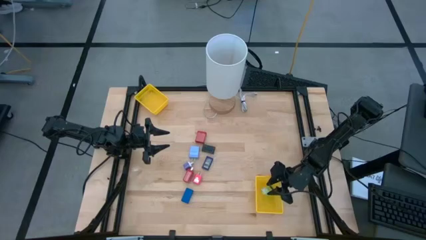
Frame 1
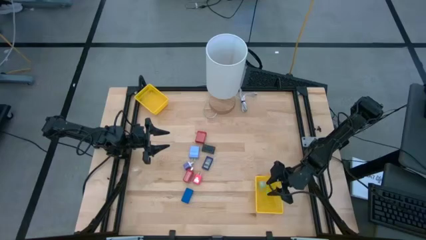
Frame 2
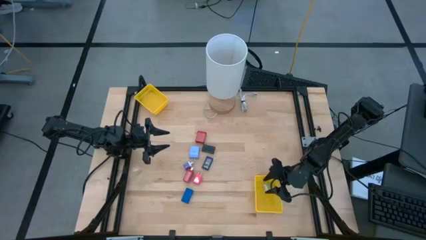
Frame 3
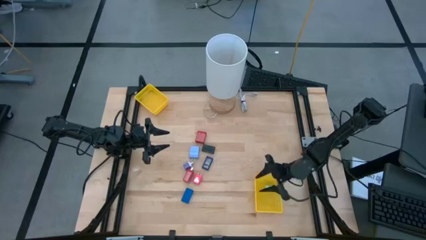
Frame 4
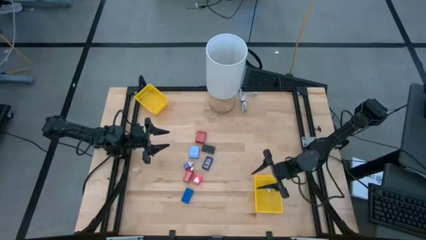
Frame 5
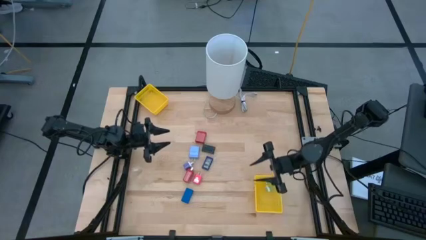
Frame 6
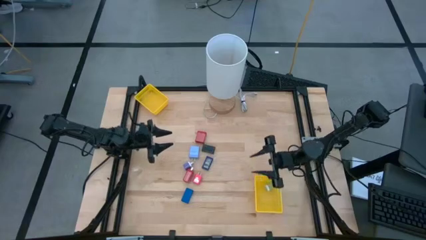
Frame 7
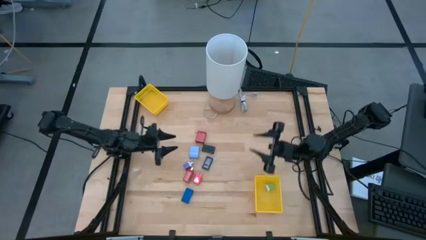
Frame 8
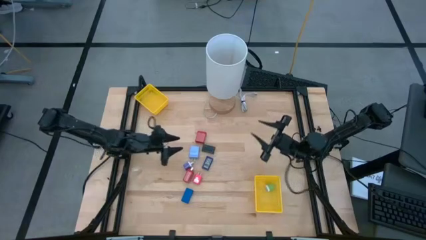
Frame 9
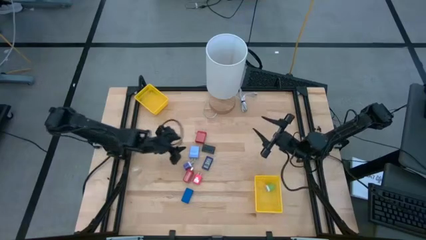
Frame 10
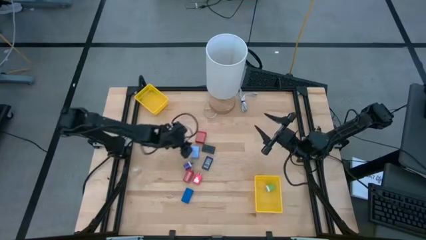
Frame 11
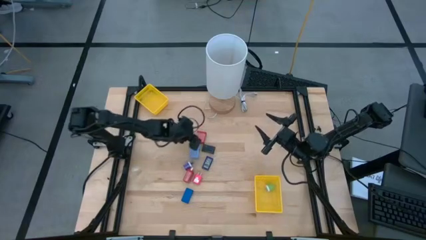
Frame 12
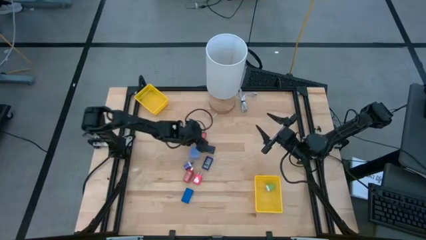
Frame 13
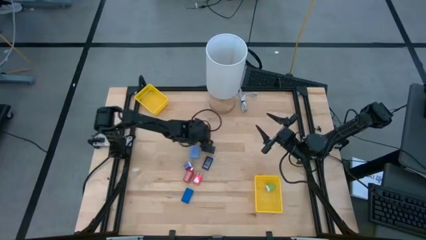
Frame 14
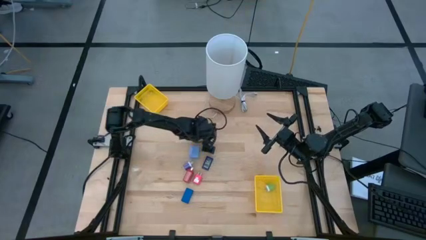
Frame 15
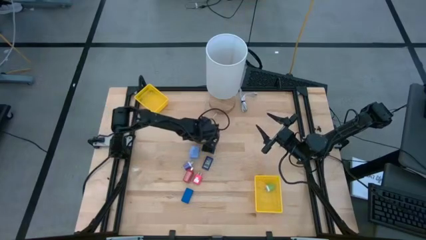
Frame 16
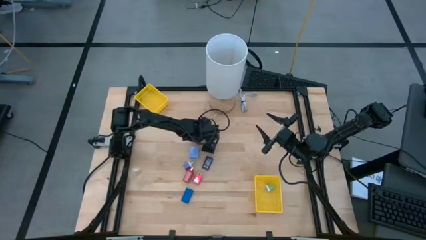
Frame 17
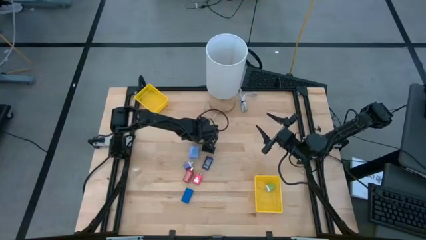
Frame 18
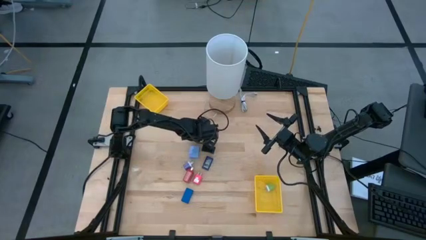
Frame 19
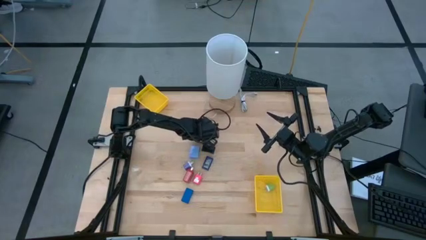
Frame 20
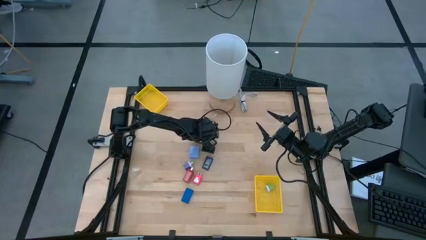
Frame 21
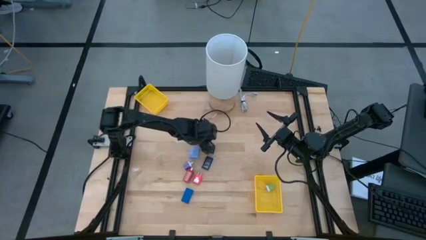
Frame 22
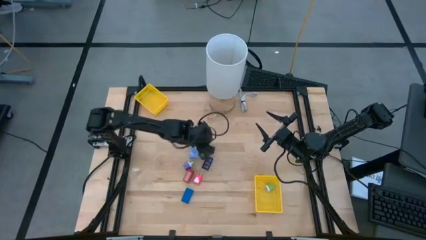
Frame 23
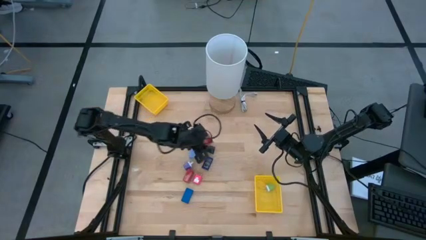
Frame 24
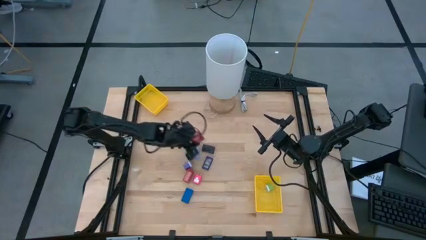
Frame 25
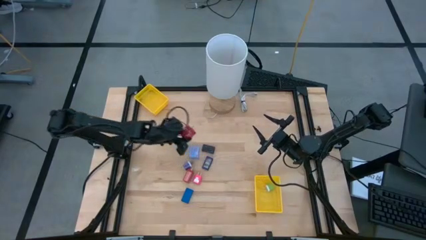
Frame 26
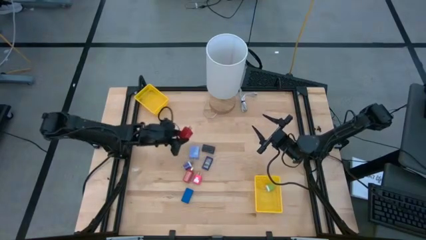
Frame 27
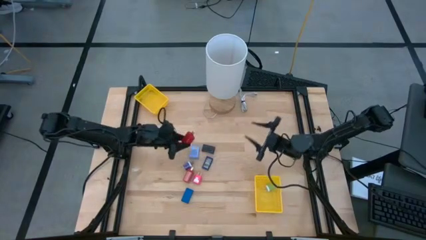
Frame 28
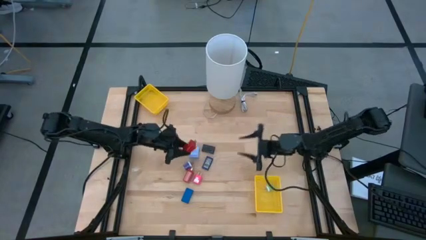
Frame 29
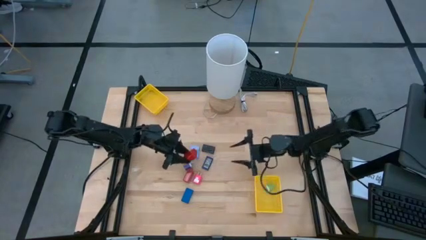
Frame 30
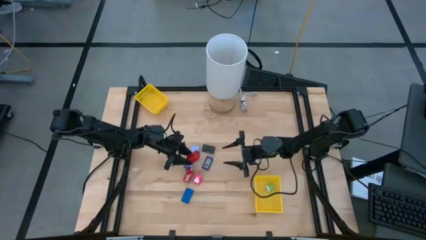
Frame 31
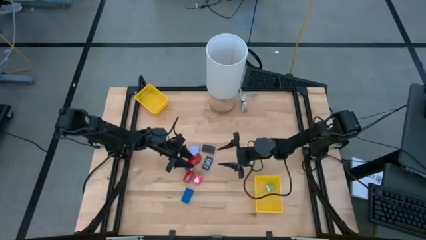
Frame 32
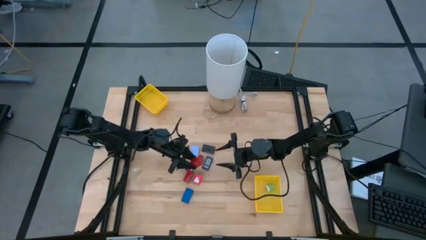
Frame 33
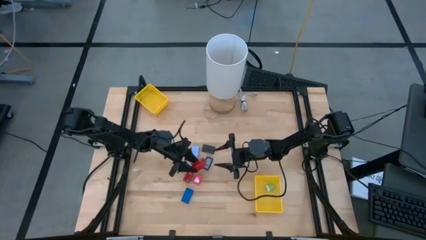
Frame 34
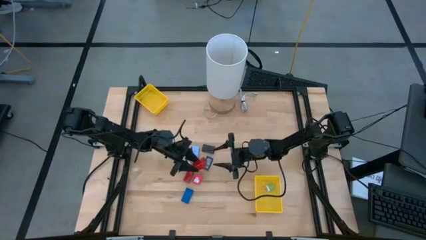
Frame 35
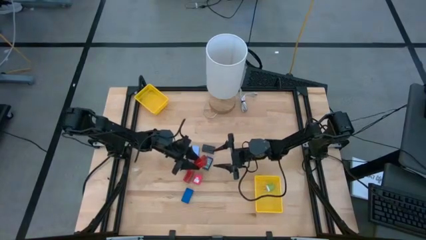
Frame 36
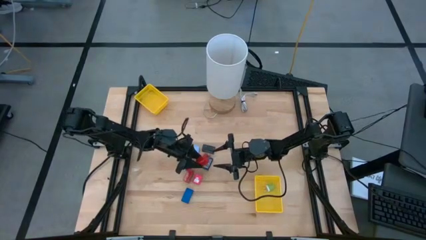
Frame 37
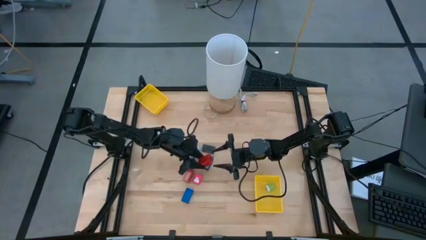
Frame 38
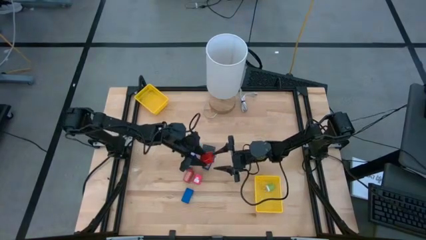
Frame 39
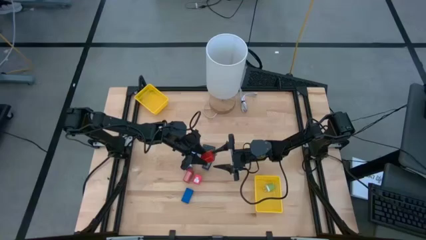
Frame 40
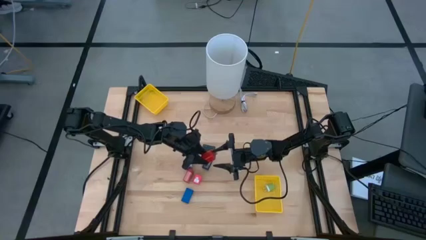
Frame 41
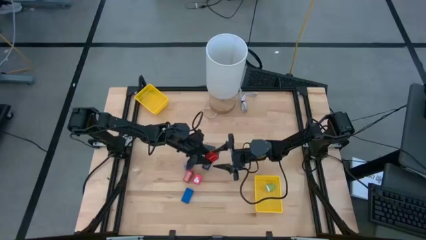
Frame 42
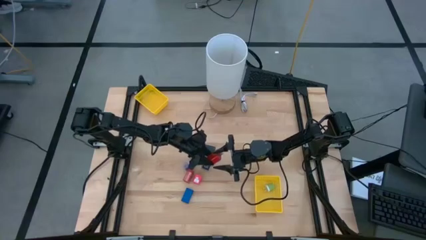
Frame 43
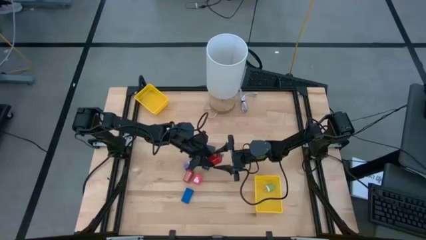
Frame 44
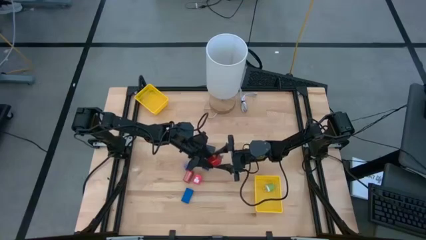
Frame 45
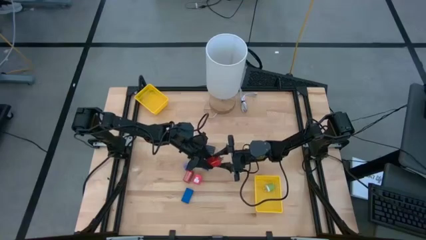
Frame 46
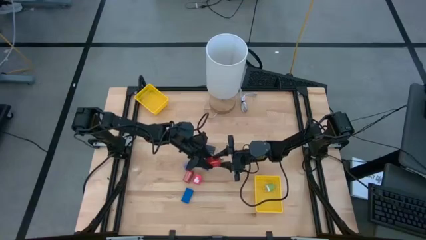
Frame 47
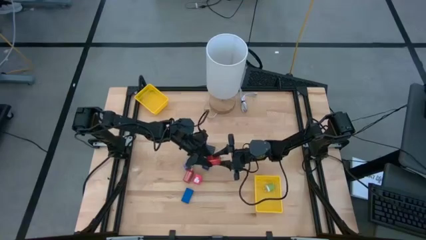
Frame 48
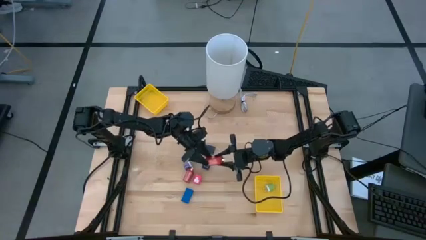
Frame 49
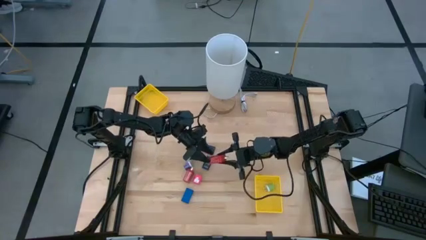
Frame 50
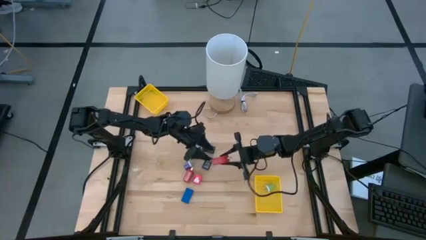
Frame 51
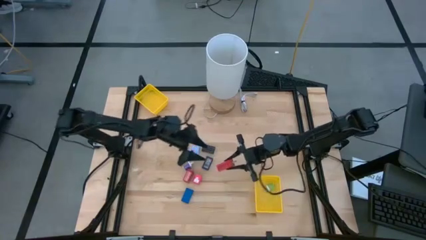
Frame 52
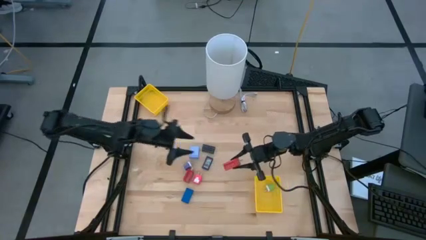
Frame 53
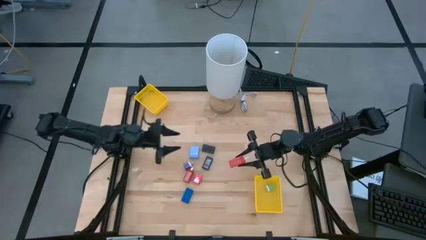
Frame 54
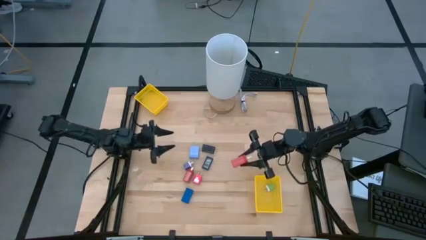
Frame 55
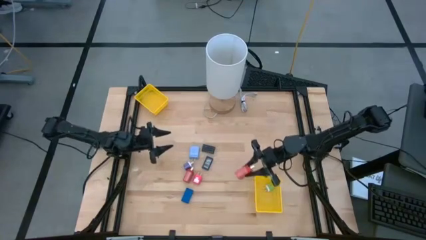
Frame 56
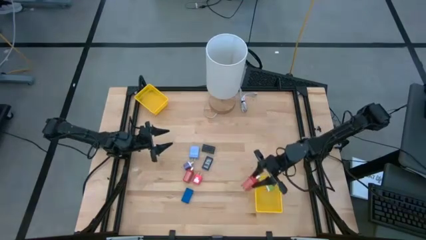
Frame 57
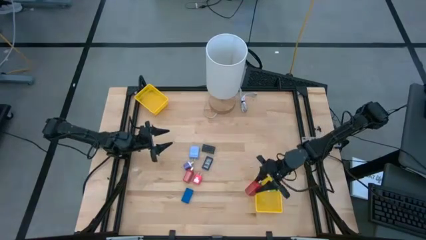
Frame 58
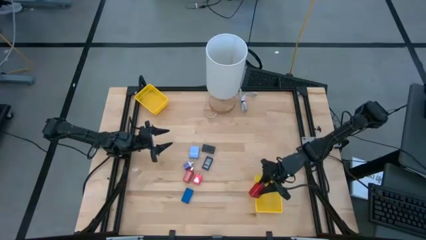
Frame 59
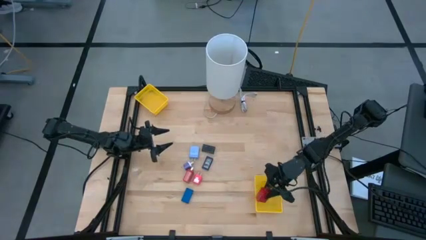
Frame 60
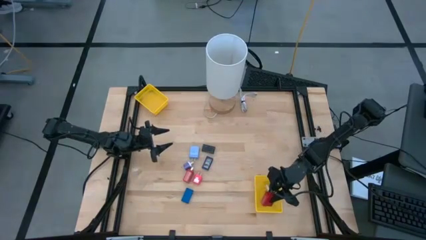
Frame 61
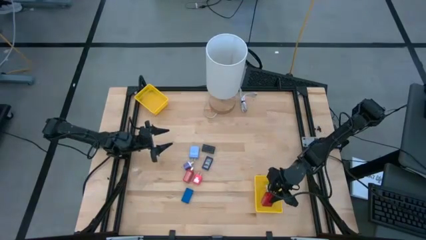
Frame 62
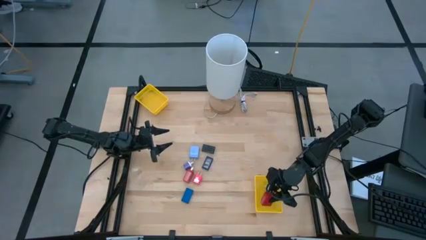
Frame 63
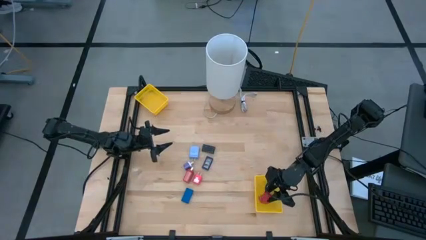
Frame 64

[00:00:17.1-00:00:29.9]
Task: Pick & Place Office items
Put the top red charger adapter into the bottom yellow bin
